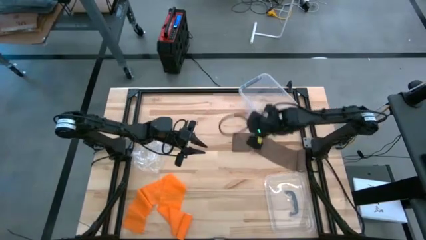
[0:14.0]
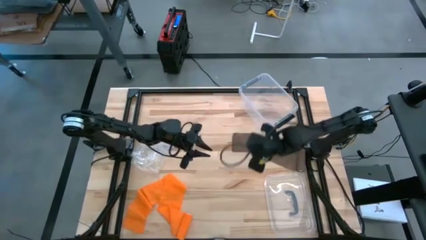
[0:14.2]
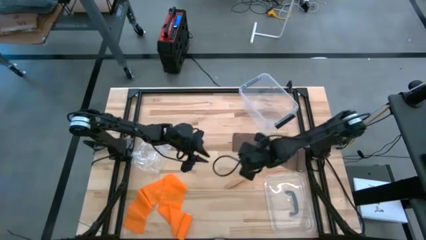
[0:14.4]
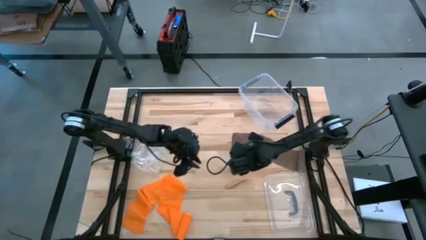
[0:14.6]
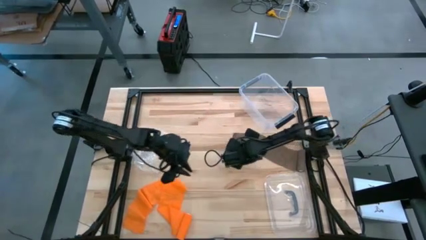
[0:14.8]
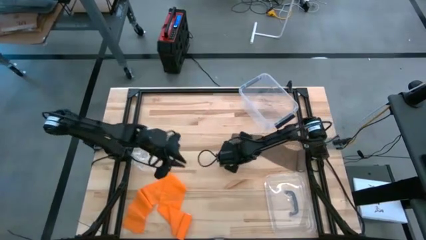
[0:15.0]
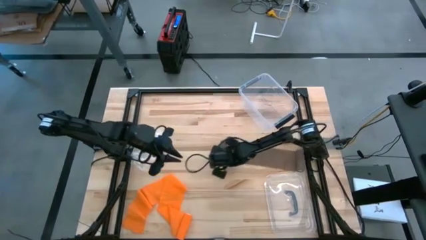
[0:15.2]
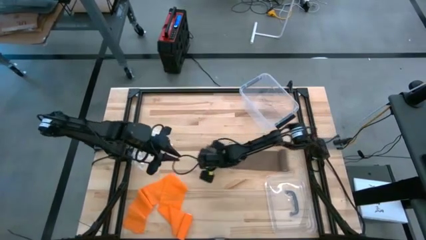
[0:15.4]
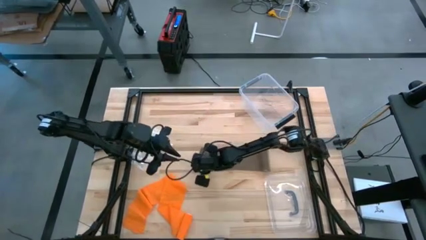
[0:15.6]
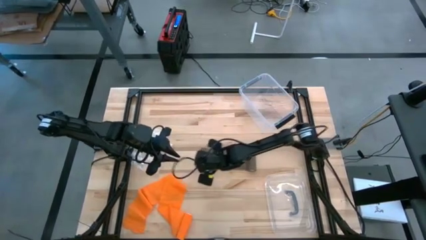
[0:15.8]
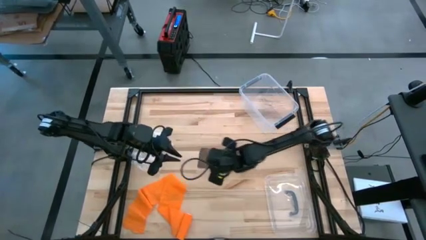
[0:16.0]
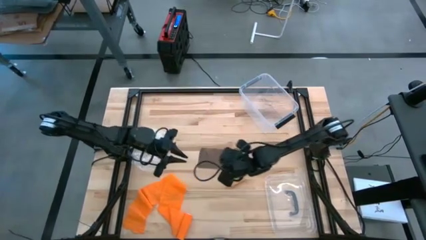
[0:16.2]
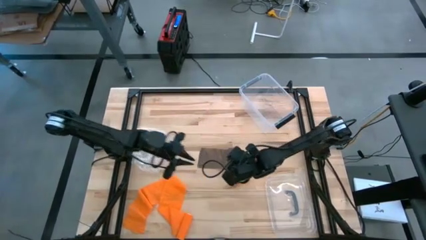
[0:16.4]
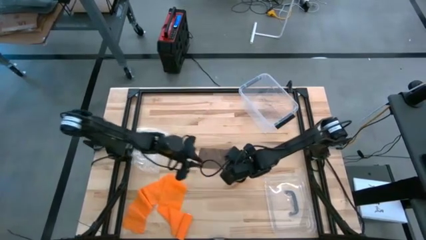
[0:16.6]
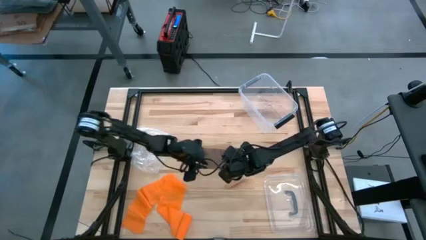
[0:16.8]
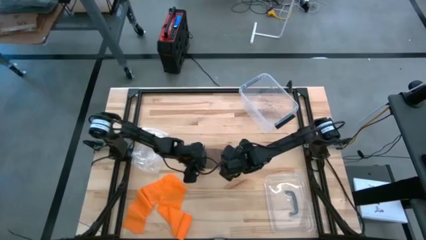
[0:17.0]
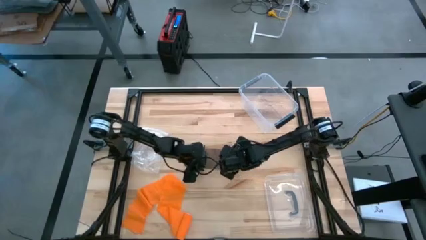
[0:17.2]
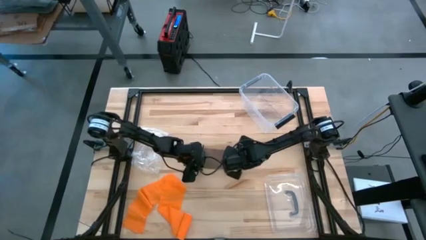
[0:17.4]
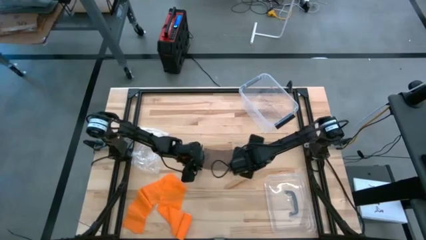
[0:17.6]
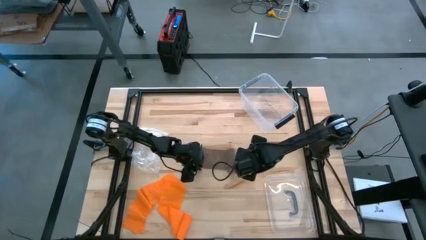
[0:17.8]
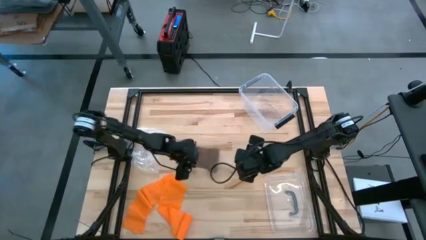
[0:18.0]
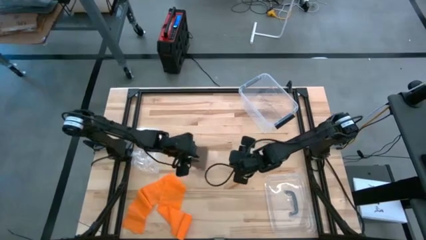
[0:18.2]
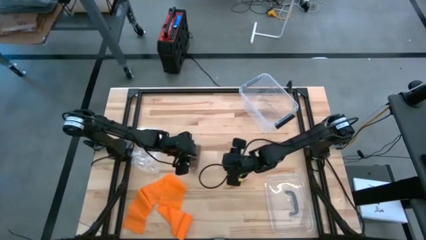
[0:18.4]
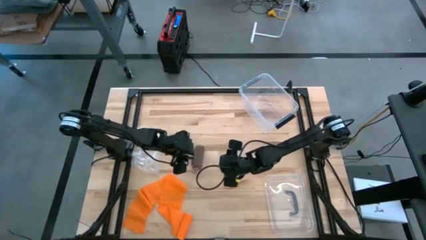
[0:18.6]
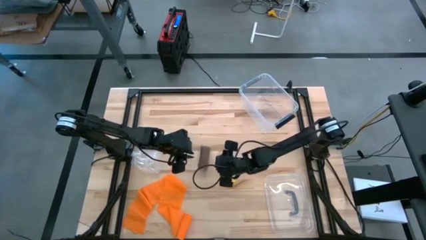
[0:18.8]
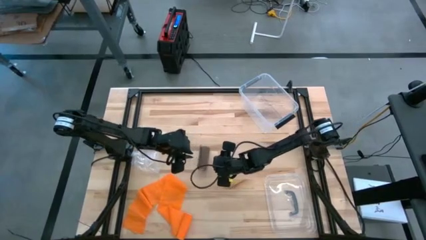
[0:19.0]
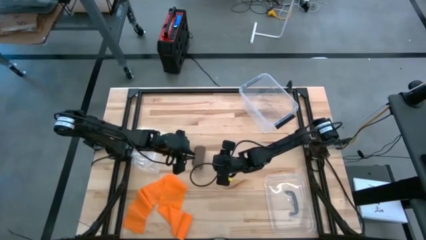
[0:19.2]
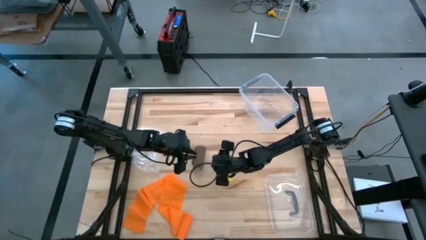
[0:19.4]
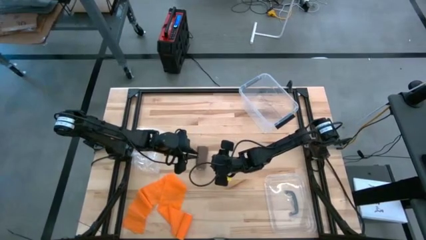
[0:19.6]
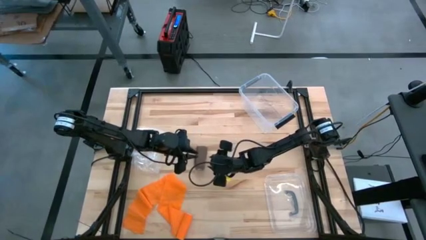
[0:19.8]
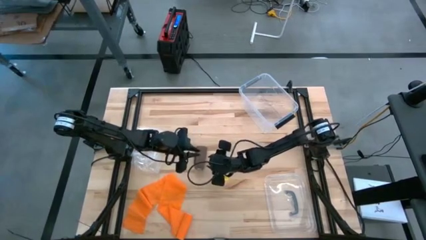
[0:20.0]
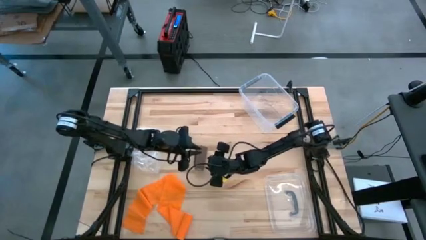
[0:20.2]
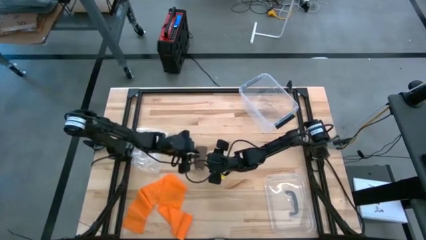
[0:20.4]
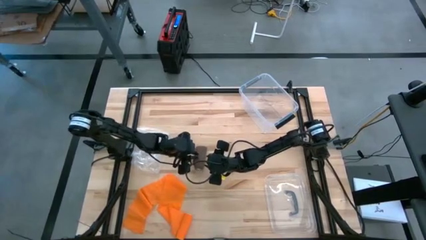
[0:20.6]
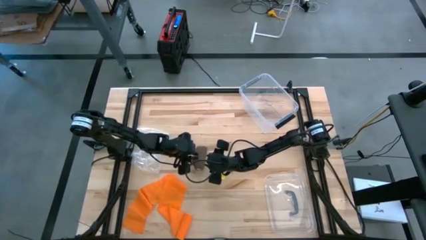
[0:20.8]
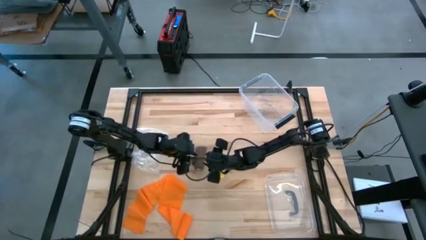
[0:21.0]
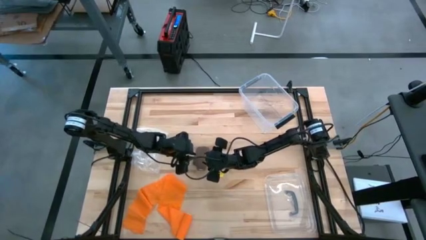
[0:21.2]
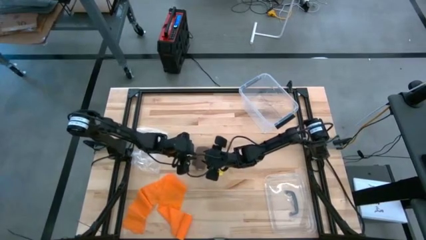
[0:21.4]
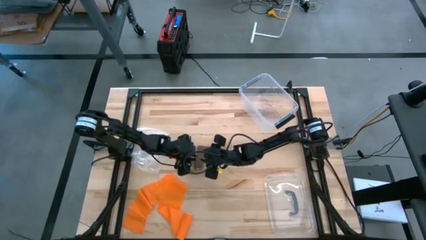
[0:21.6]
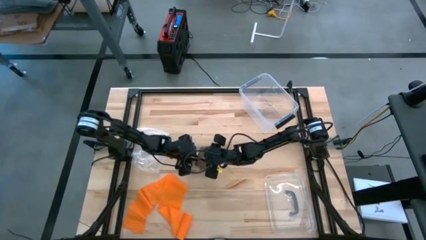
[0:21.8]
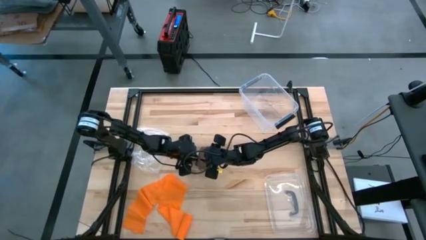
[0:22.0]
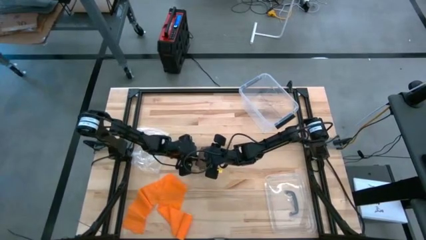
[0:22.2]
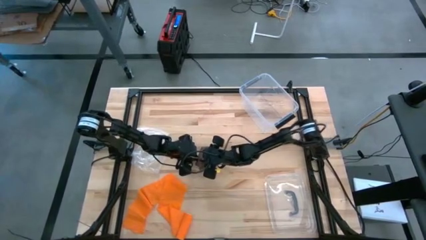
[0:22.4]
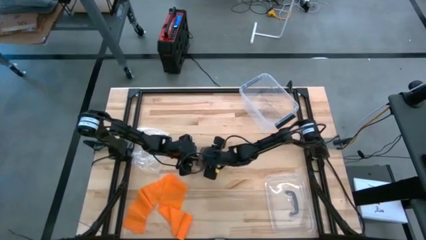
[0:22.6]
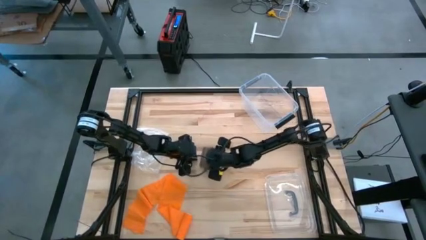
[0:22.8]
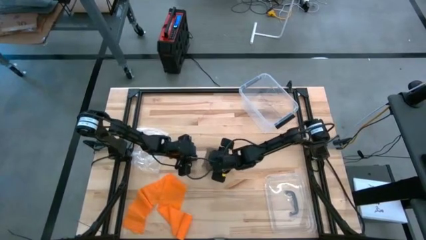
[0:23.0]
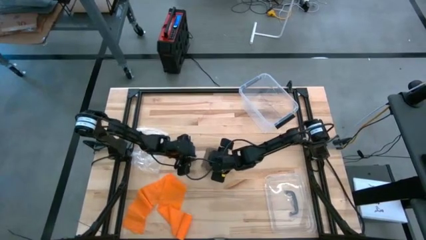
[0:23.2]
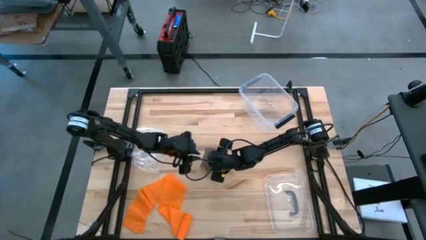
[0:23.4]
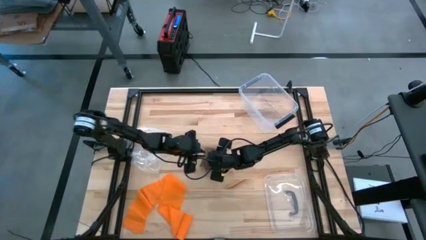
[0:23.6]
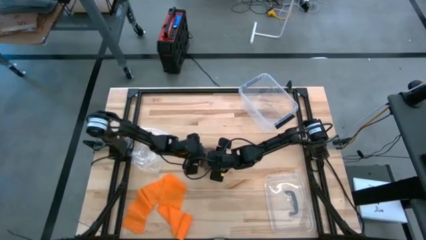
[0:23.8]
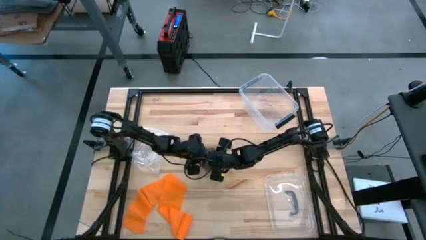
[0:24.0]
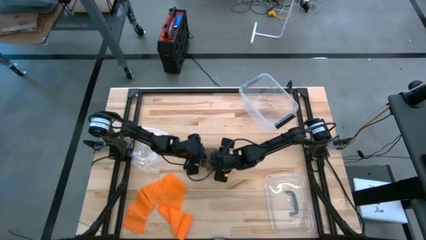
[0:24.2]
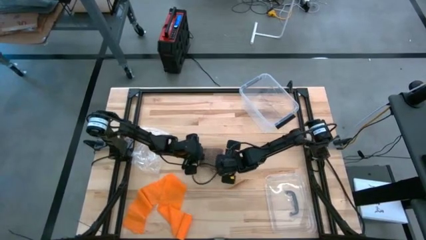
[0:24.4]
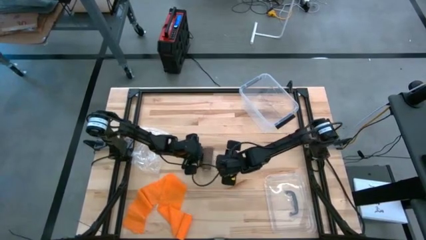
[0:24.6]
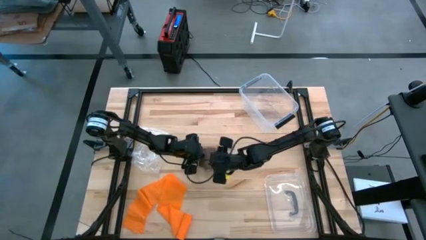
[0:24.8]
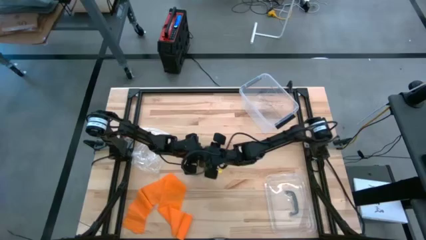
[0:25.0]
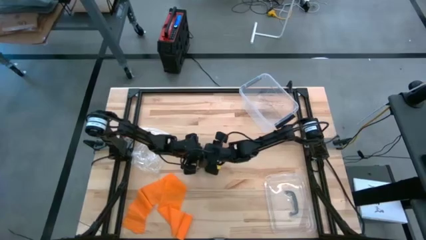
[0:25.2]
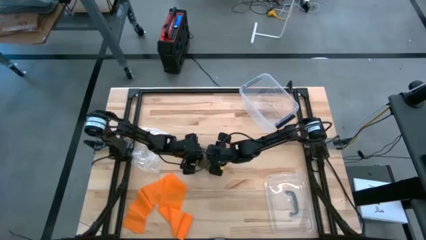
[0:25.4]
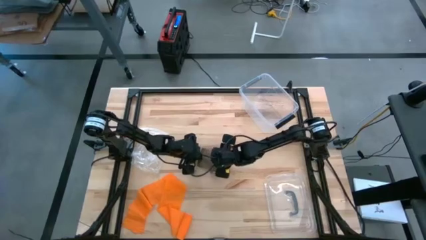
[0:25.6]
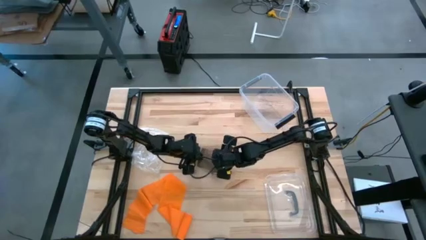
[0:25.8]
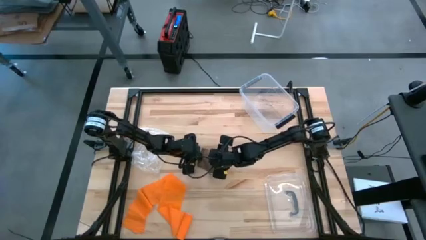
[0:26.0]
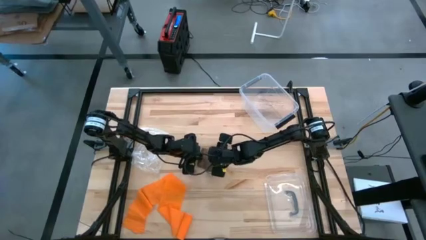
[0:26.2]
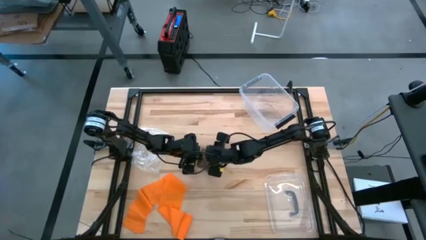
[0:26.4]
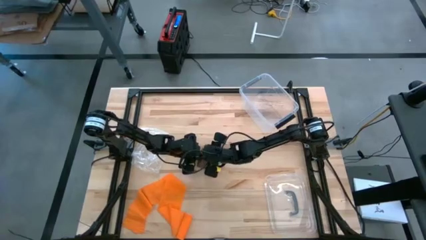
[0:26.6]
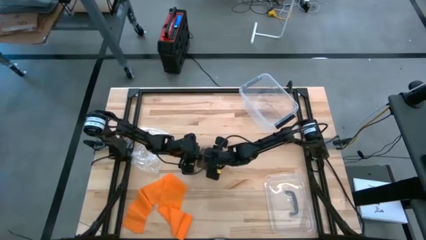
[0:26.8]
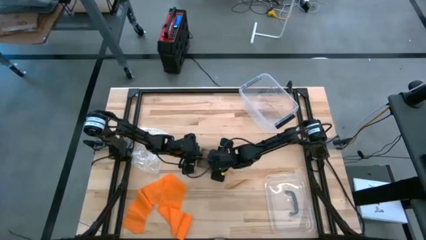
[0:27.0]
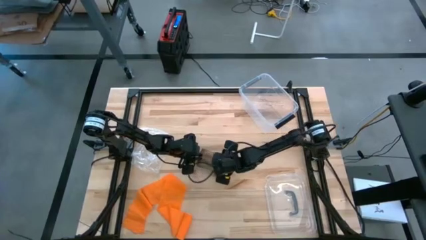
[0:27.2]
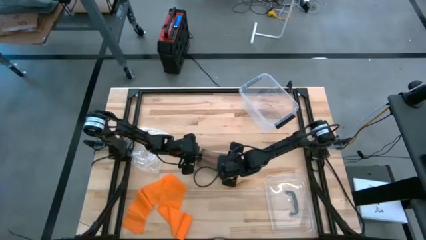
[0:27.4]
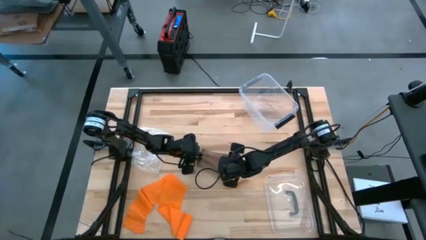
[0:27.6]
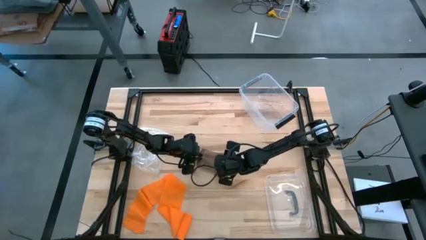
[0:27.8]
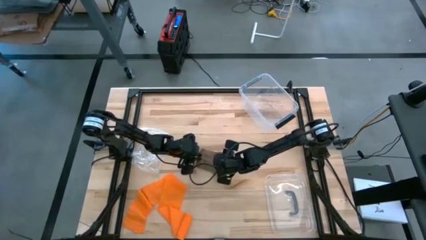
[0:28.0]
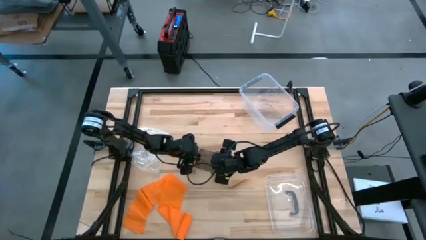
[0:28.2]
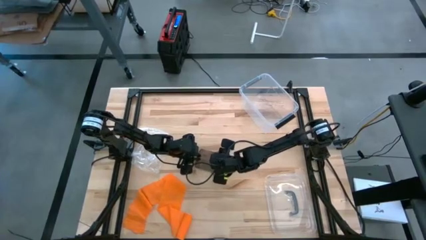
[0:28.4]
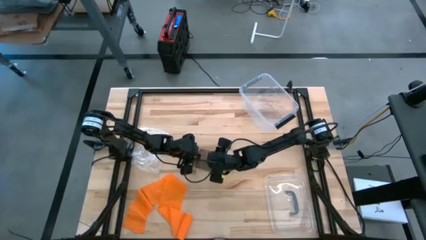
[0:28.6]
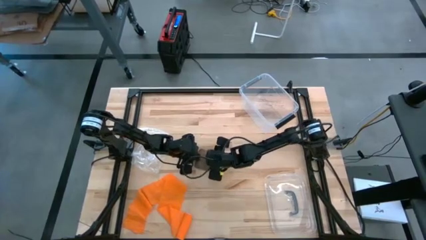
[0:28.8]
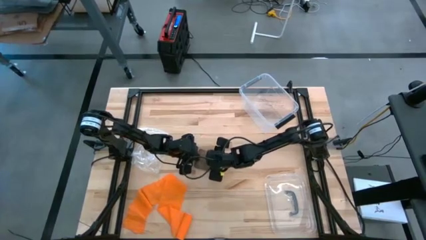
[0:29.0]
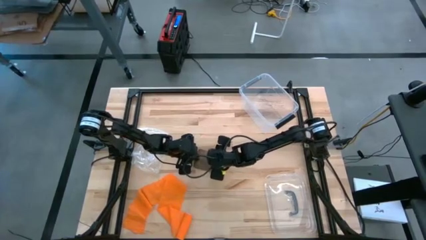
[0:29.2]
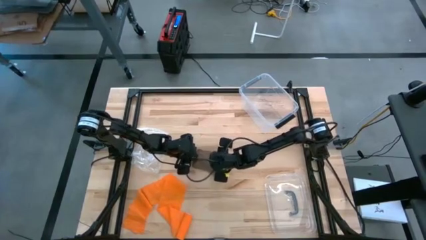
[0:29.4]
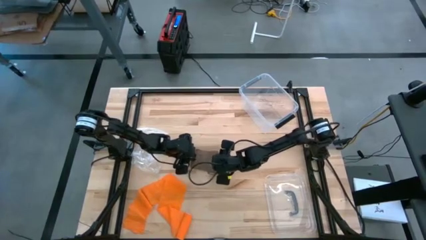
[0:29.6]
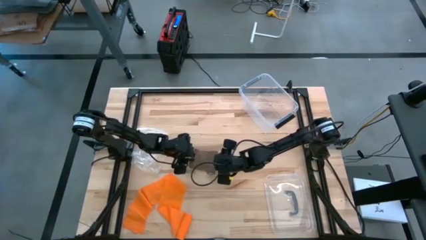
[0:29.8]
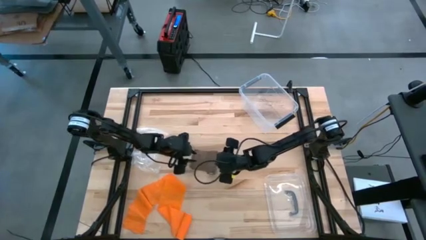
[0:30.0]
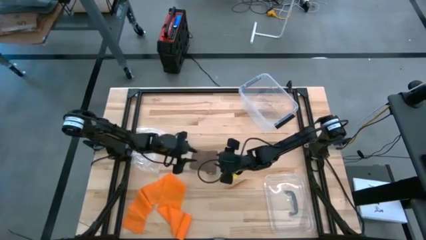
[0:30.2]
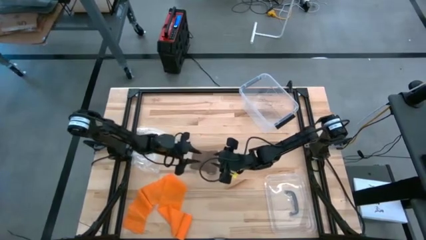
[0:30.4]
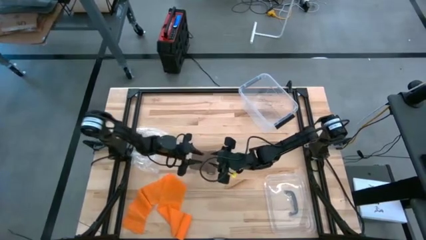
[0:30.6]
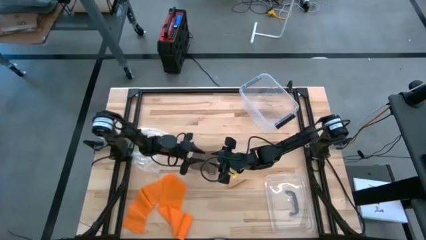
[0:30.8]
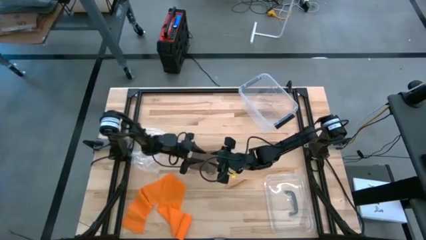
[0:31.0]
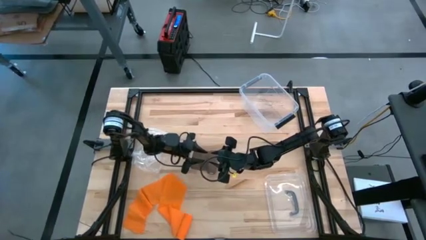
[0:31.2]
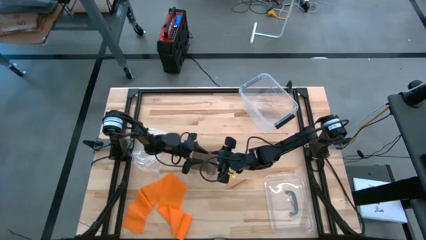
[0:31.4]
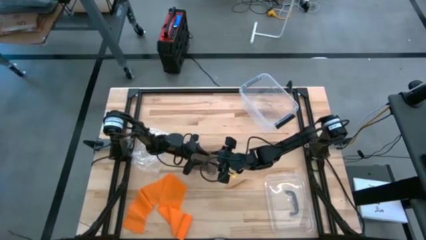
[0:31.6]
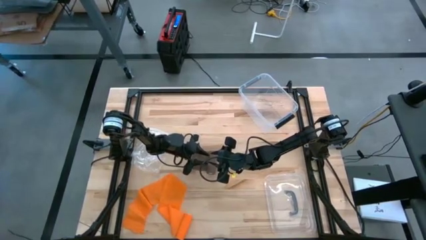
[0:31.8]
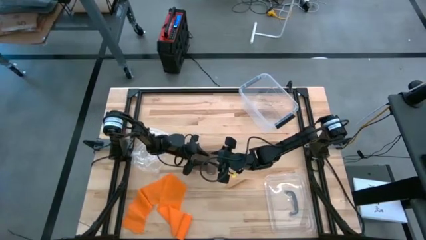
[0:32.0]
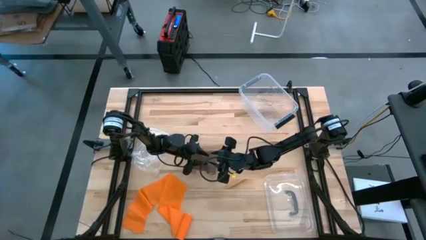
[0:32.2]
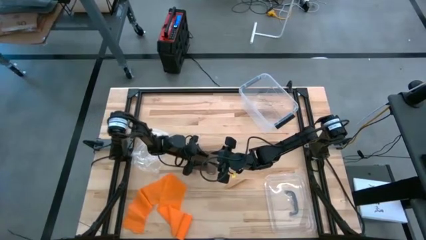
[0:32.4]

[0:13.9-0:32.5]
Task: Roll bandage
Uncoil the brown bandage
